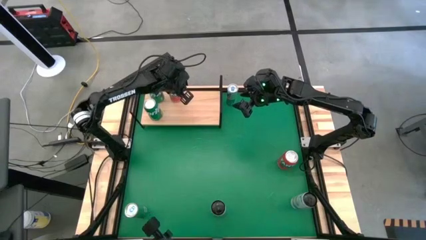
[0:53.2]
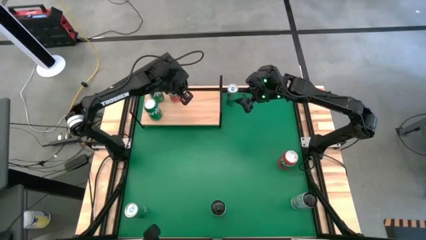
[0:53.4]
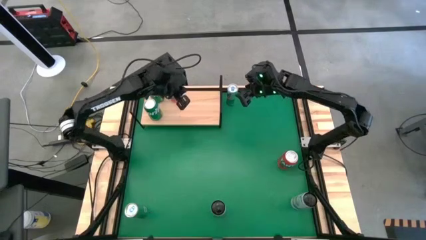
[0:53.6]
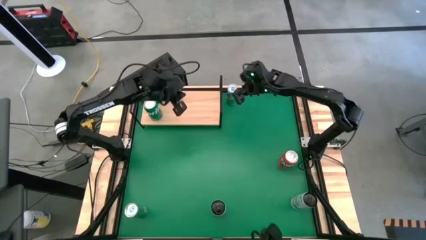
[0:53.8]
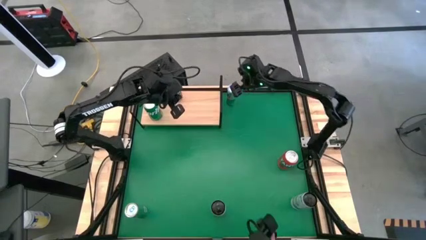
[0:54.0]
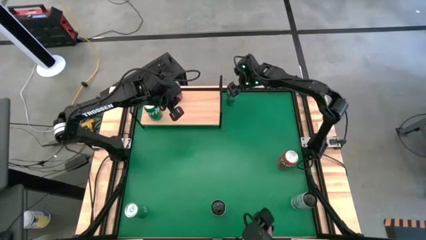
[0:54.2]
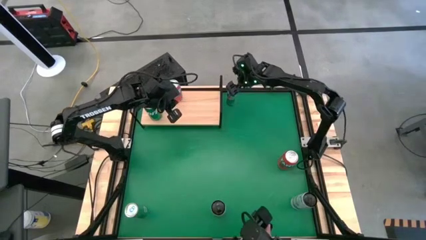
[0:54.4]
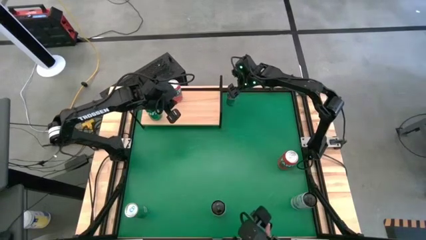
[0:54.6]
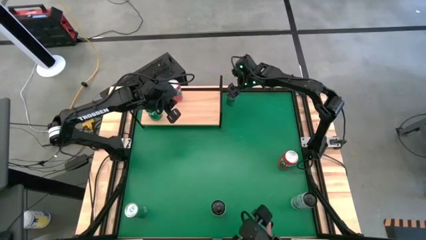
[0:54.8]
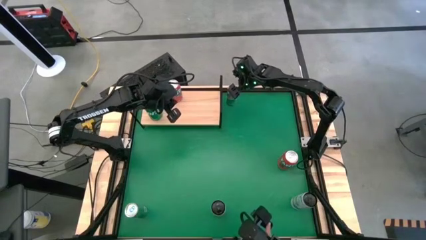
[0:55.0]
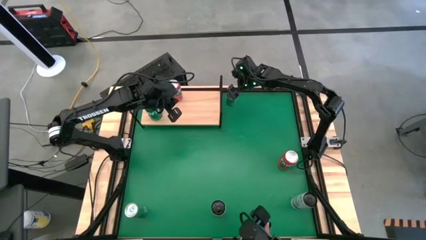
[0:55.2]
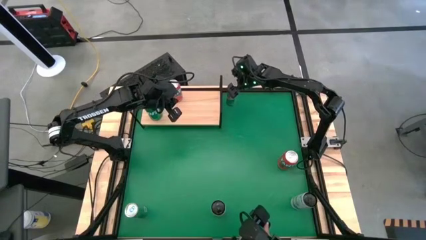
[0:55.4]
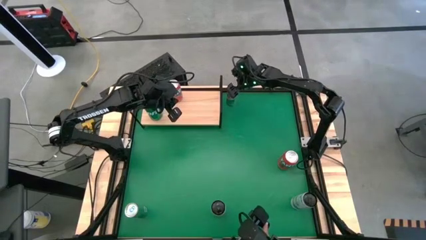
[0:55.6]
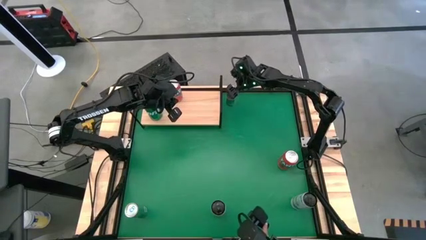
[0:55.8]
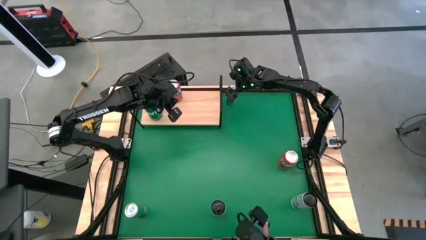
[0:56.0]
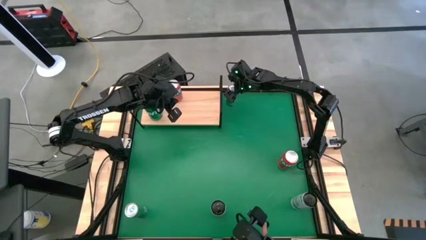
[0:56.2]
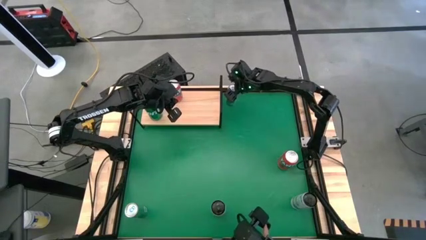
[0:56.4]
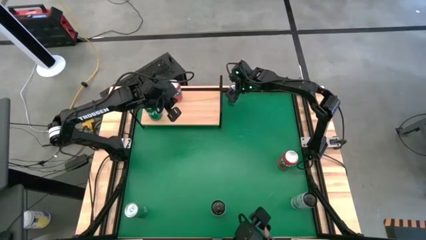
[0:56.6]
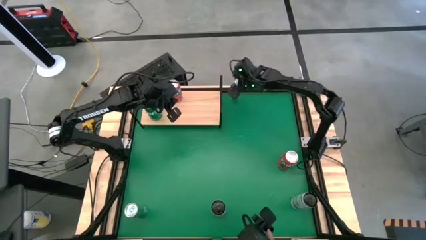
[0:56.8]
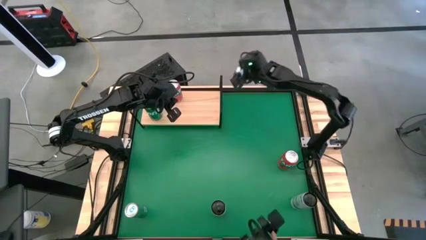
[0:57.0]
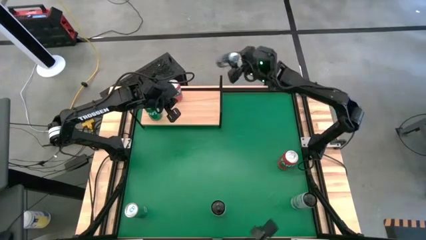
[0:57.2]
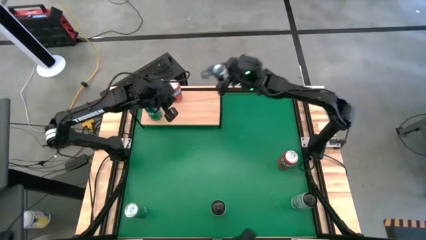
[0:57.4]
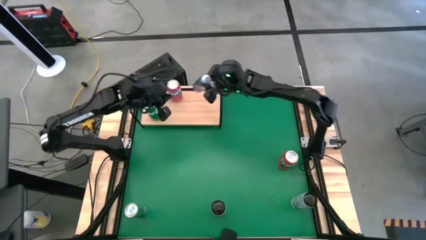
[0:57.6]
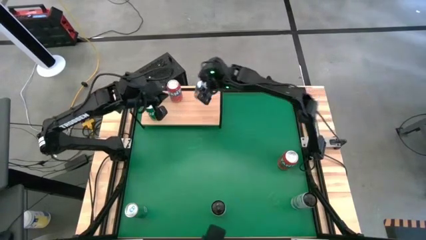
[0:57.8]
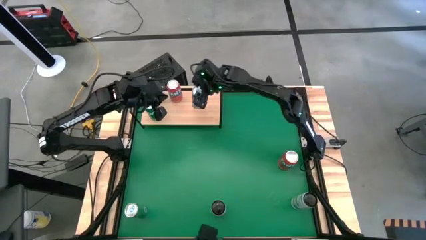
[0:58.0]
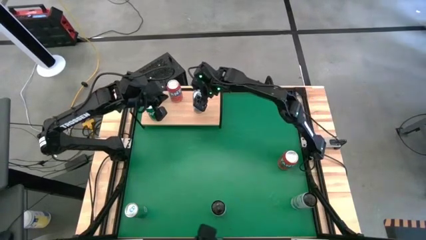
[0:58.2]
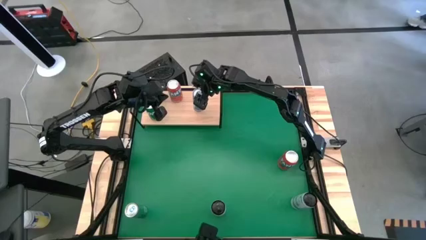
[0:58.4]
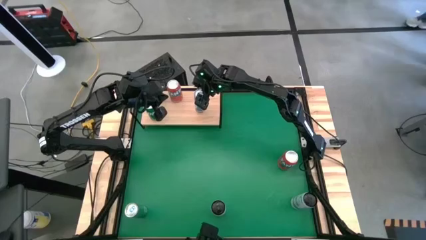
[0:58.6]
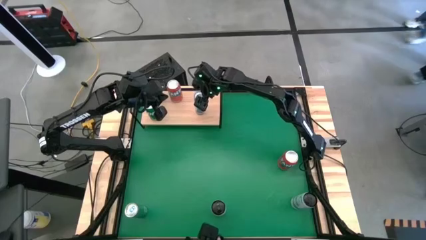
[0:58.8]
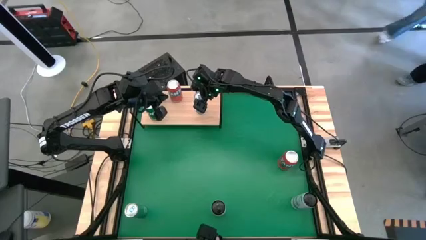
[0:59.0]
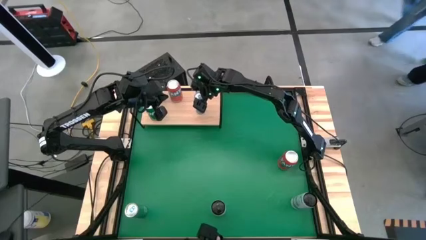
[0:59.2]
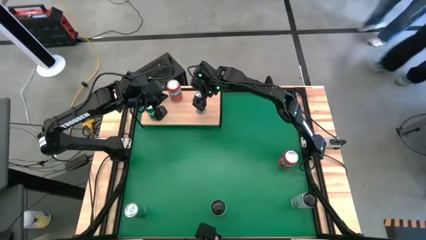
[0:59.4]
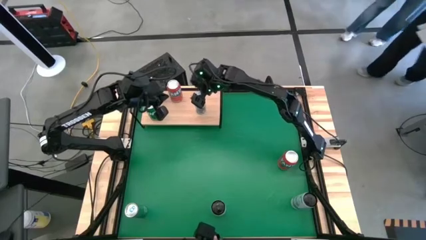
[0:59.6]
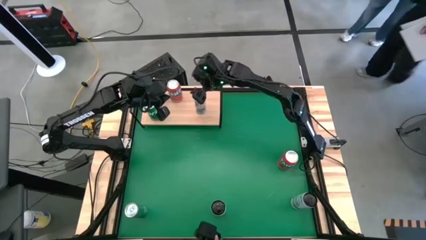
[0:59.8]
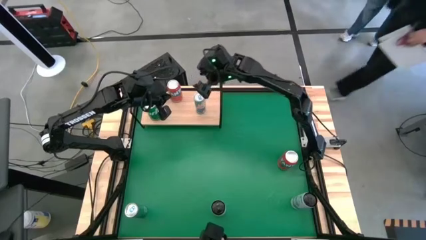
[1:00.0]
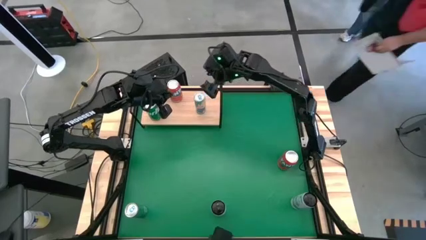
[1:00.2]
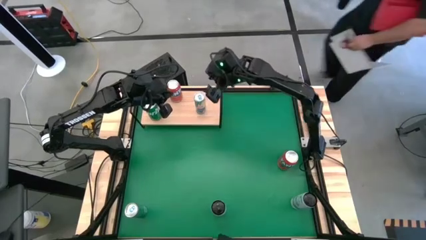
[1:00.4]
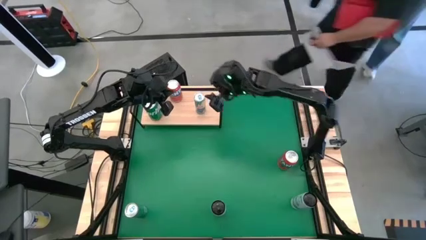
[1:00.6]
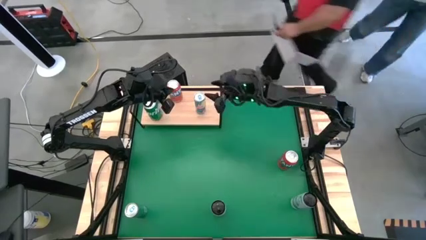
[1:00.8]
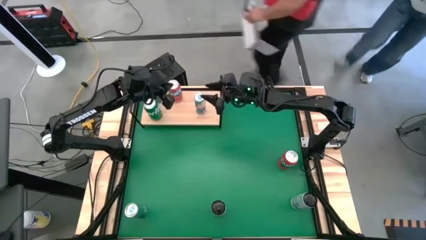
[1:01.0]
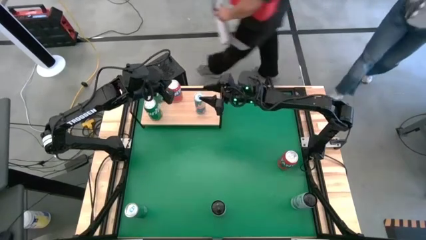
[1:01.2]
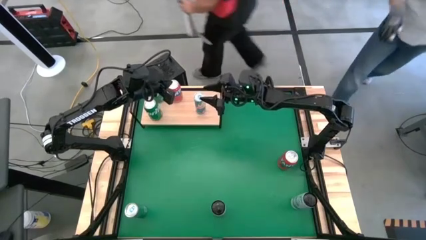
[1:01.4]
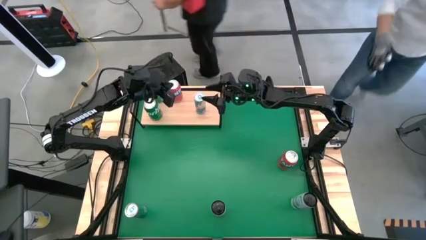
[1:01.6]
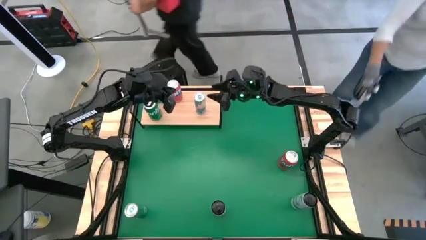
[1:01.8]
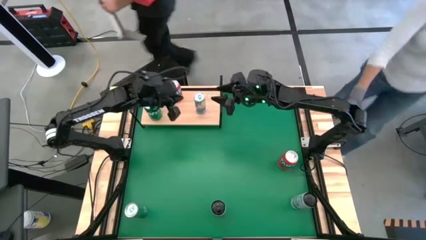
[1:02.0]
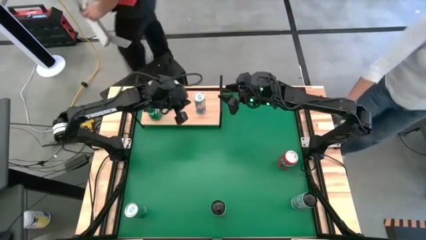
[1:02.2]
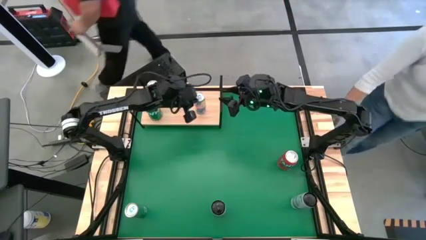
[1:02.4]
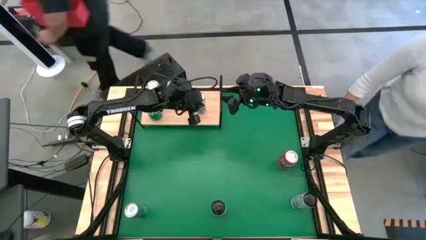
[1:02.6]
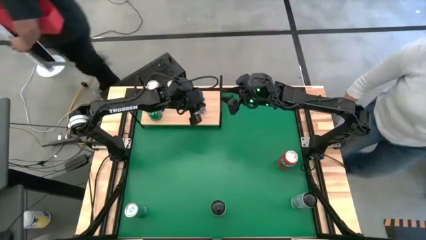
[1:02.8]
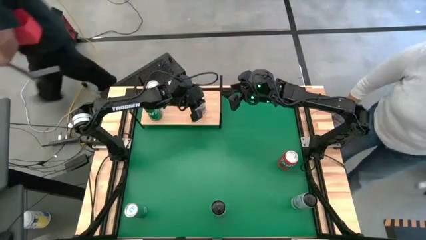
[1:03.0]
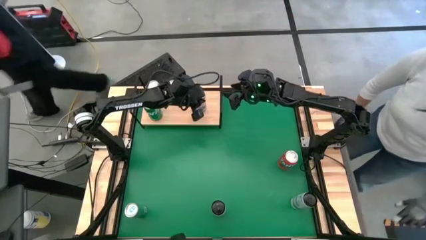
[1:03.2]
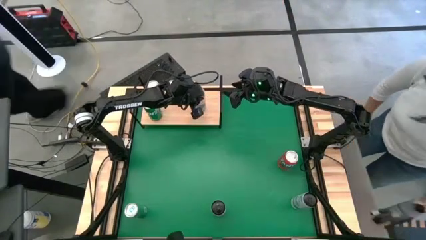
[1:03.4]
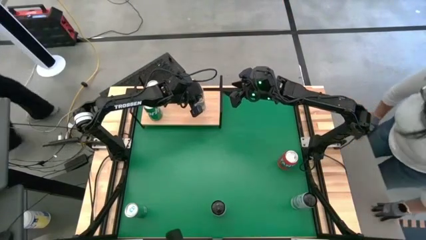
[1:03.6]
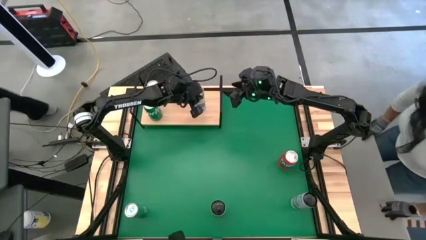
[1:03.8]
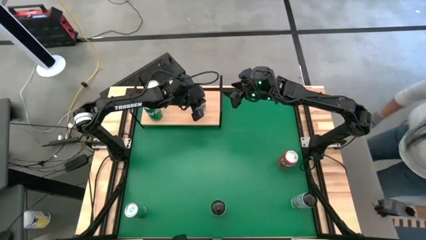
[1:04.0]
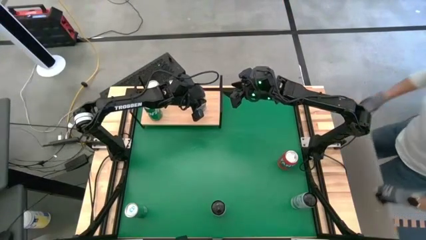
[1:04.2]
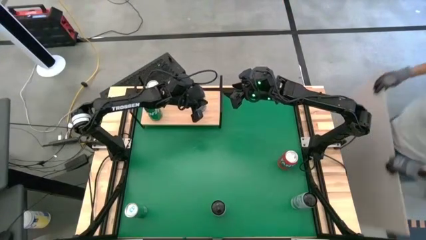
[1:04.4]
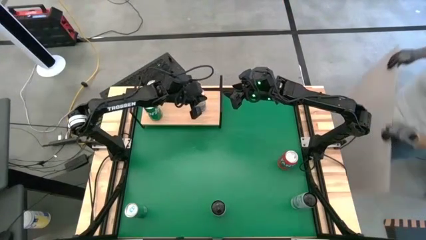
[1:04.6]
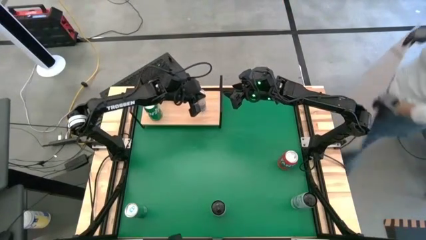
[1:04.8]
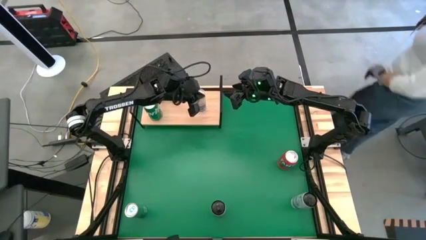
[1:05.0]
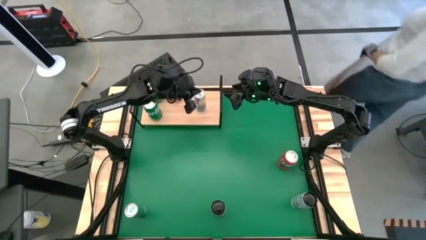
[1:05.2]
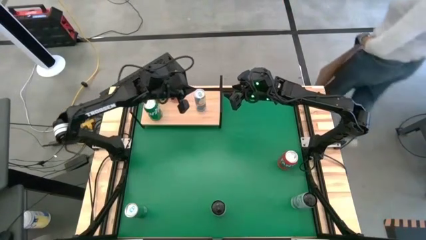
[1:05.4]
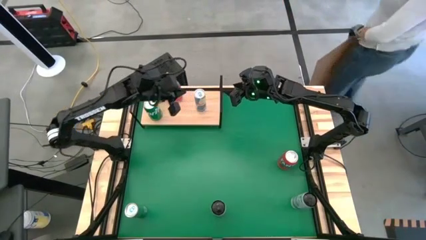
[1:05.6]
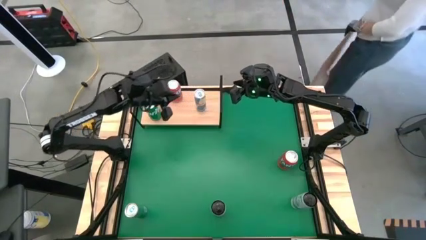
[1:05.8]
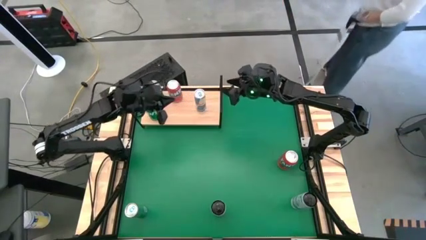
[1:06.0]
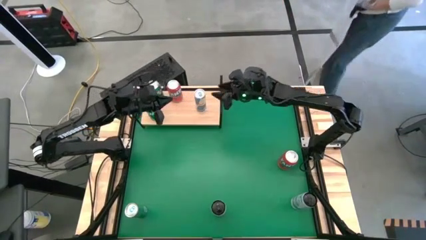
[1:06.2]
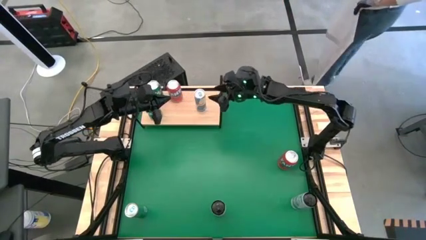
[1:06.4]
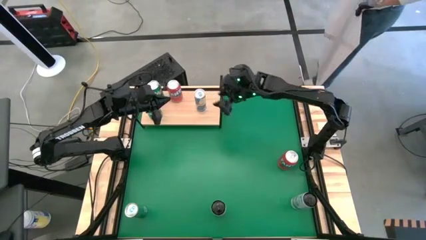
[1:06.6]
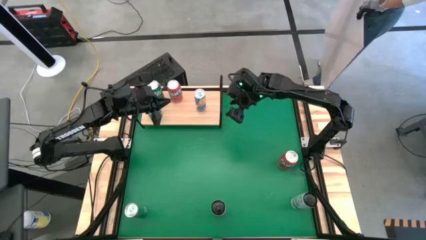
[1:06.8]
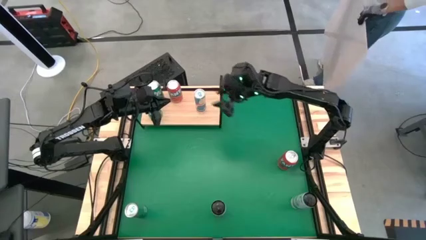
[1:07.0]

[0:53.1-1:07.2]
Task: Place canned beverage on shelf
Put the top blue soda can on the shelf
